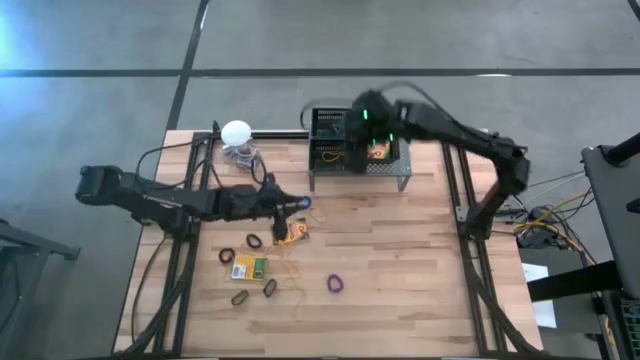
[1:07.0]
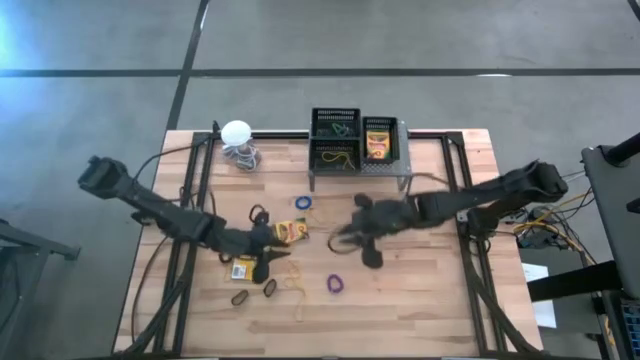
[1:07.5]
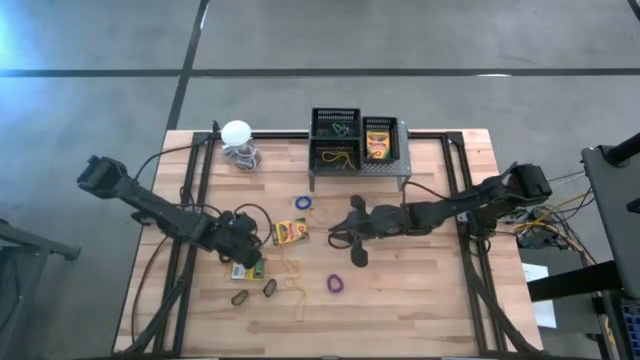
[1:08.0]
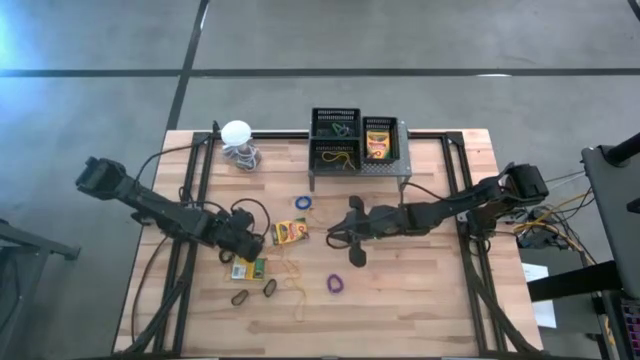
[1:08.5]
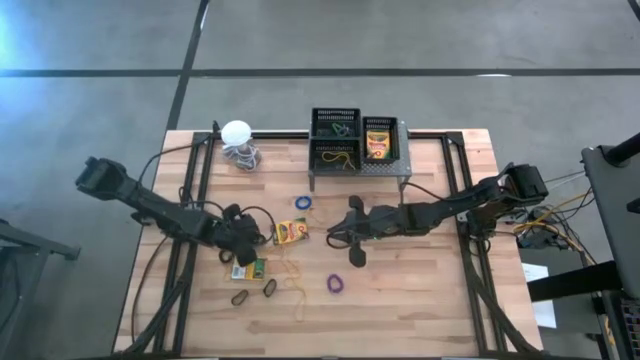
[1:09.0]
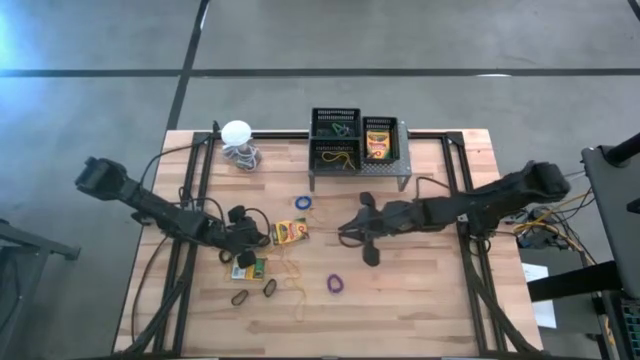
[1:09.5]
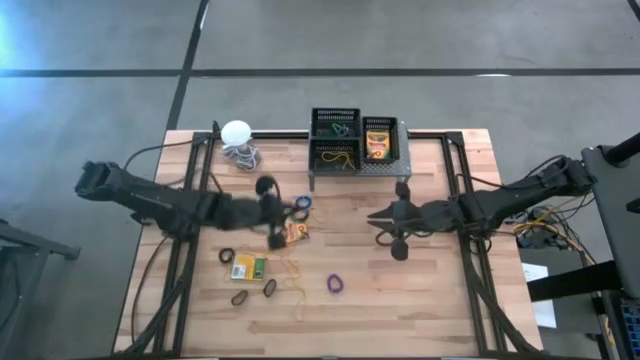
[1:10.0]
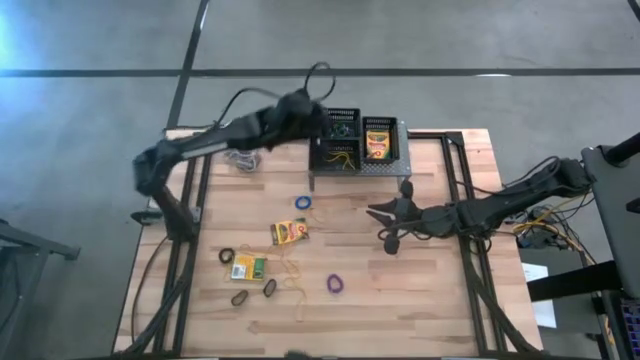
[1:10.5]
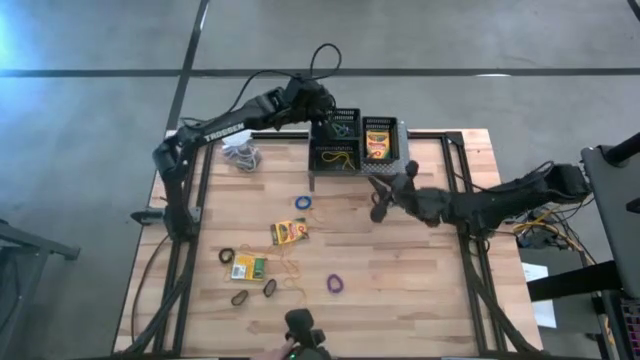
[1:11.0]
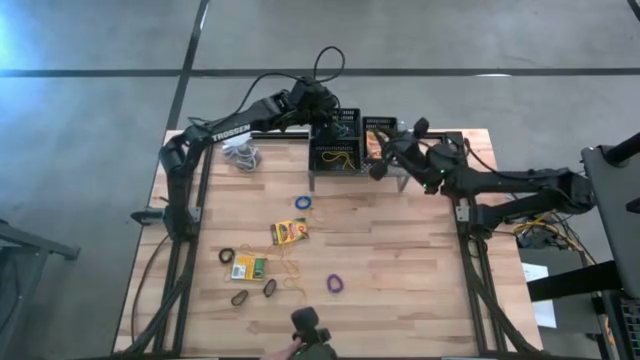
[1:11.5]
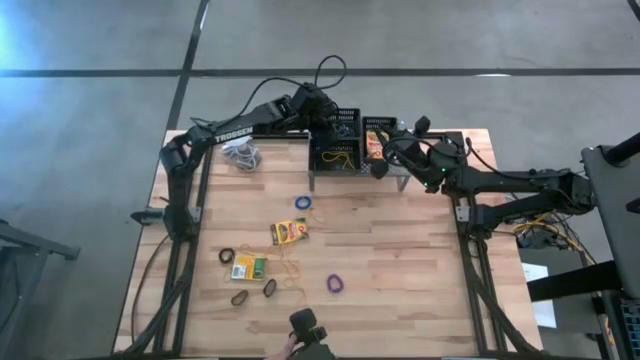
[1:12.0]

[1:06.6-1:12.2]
Task: Pick & Place Office Desk Supplies
Put the right black spring keychain into the top left black bin

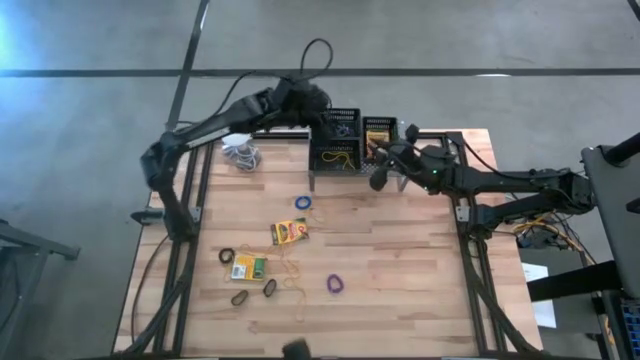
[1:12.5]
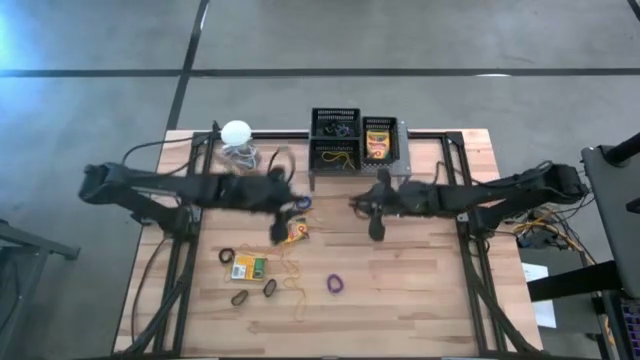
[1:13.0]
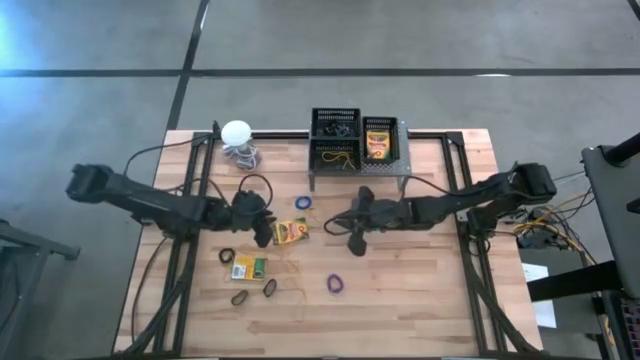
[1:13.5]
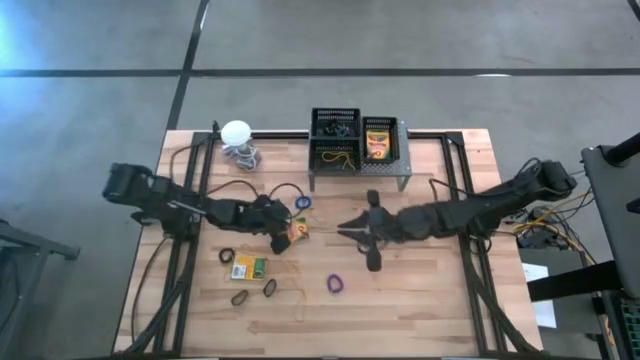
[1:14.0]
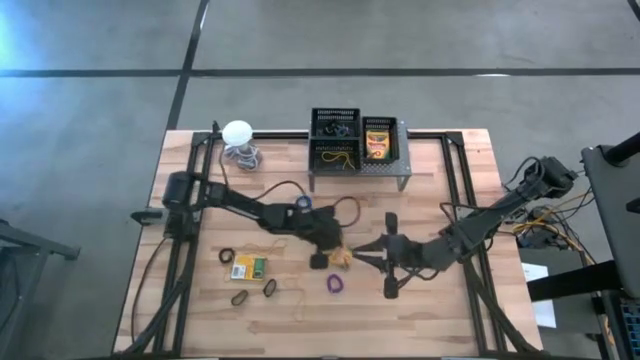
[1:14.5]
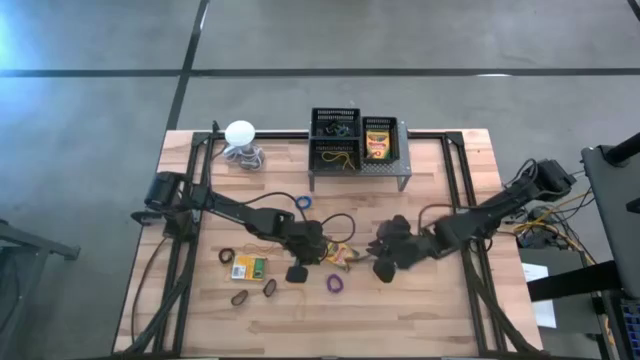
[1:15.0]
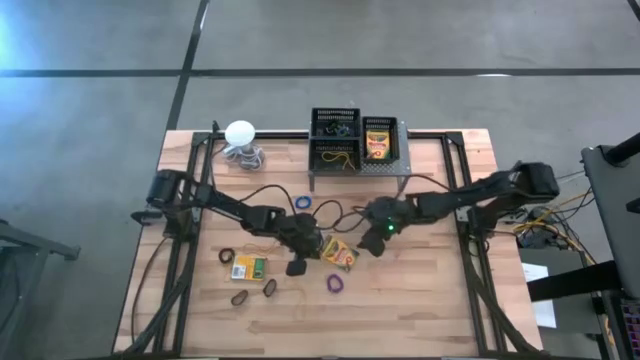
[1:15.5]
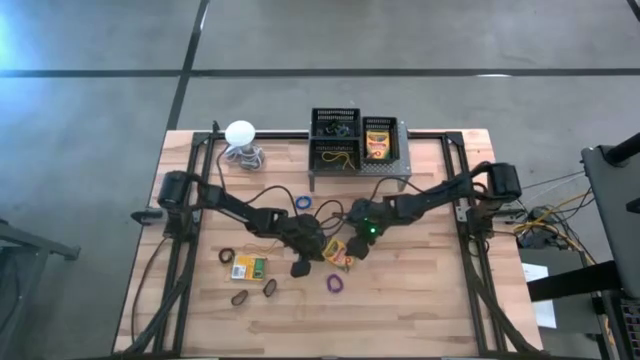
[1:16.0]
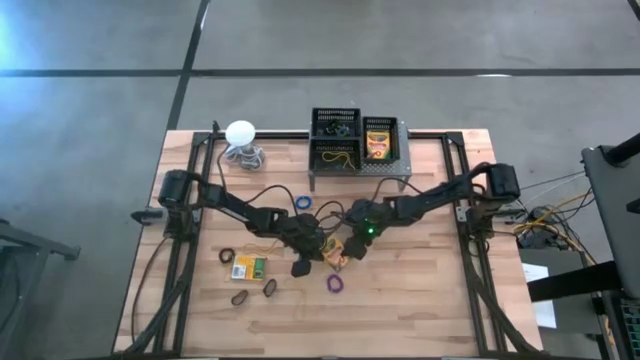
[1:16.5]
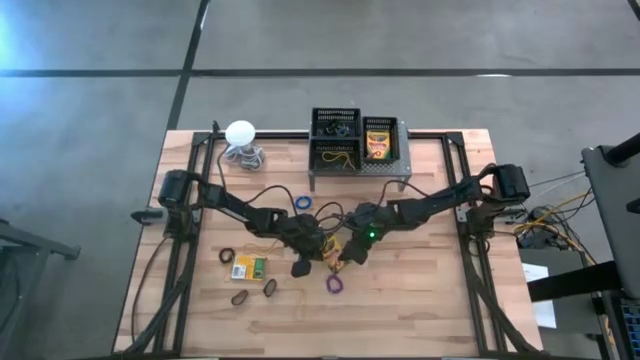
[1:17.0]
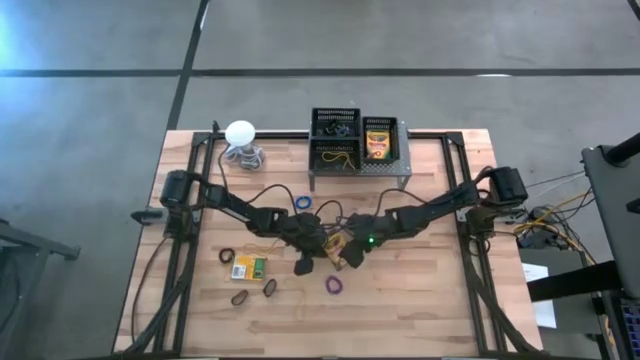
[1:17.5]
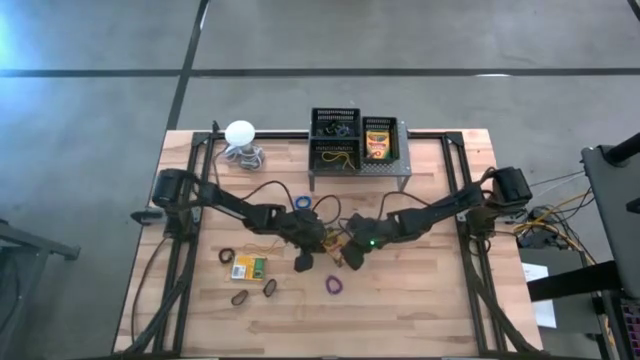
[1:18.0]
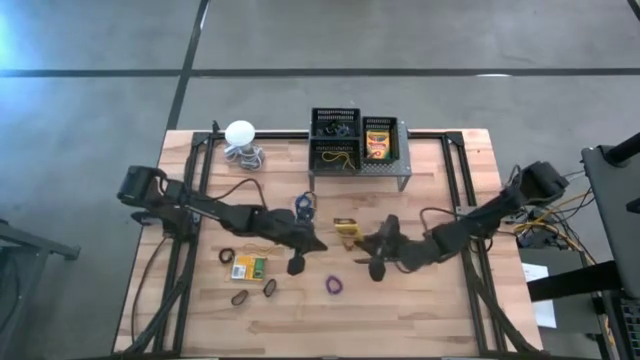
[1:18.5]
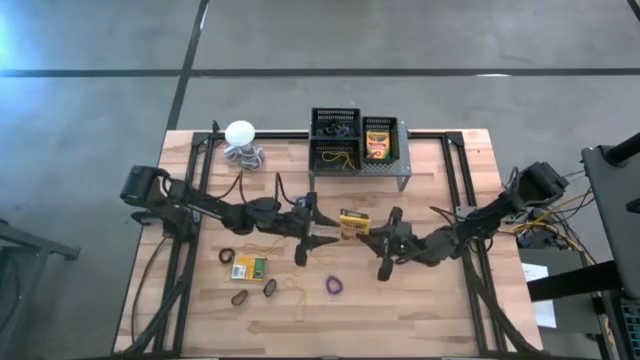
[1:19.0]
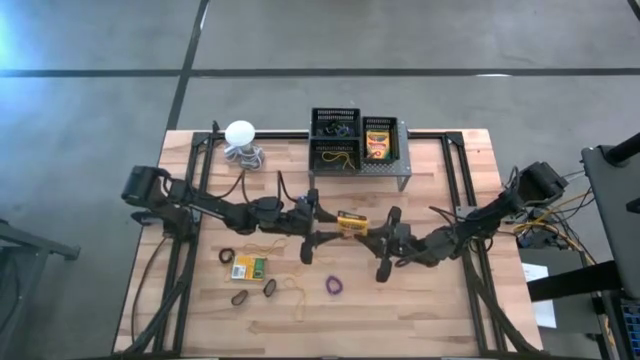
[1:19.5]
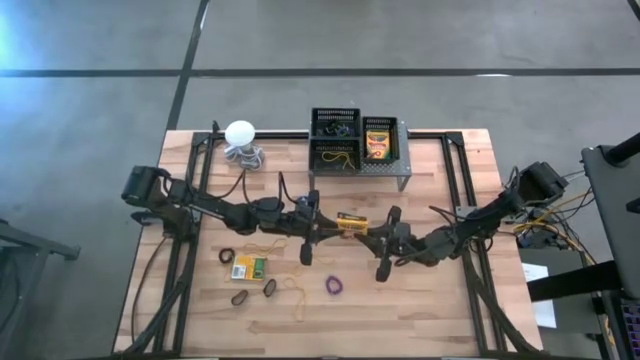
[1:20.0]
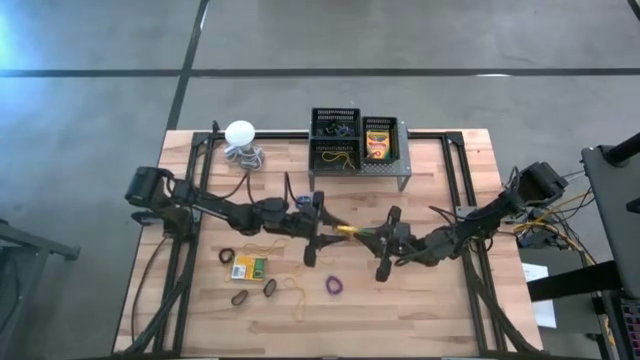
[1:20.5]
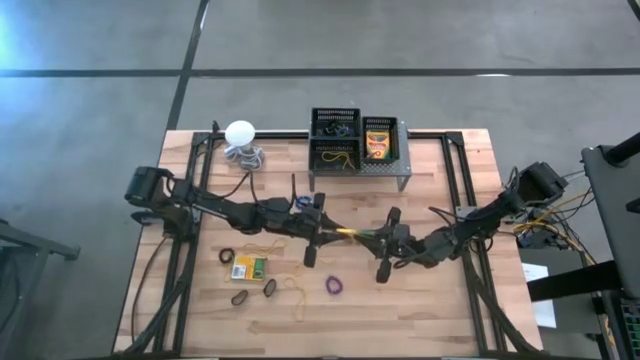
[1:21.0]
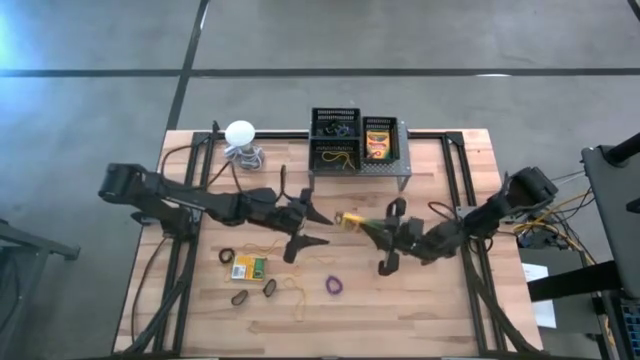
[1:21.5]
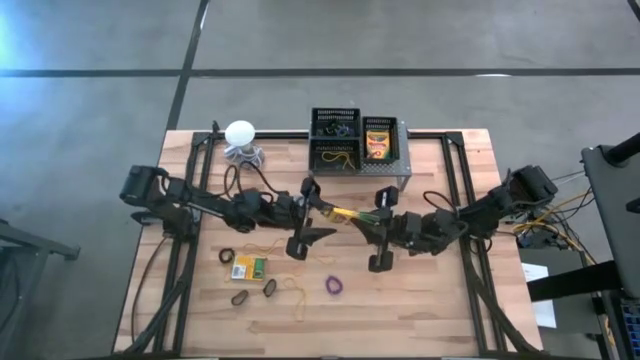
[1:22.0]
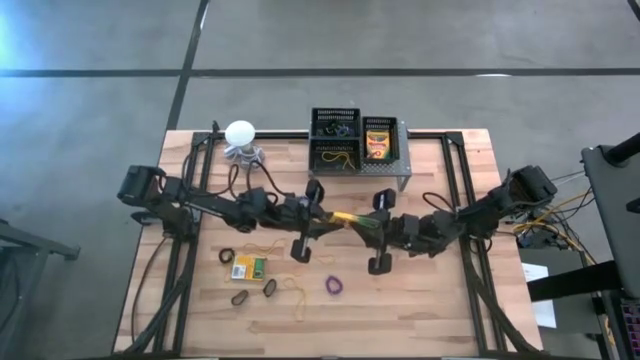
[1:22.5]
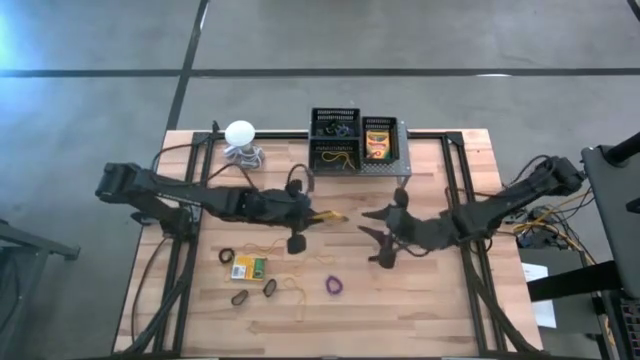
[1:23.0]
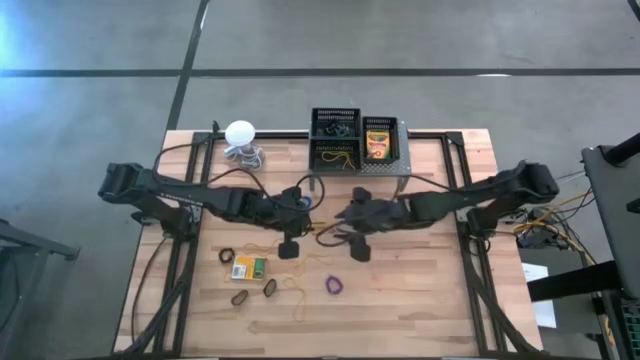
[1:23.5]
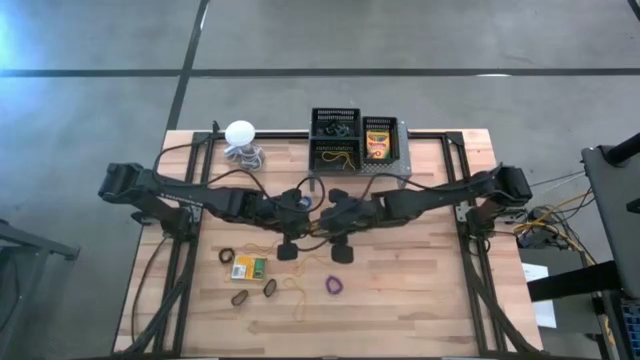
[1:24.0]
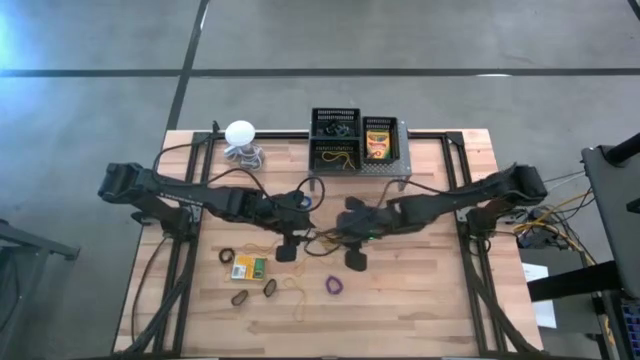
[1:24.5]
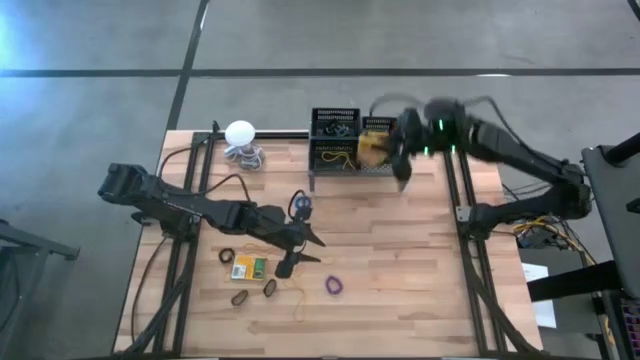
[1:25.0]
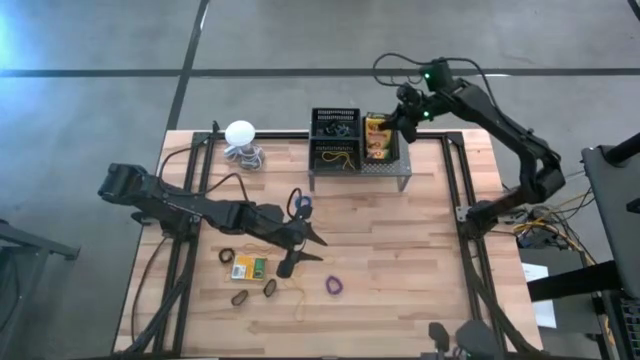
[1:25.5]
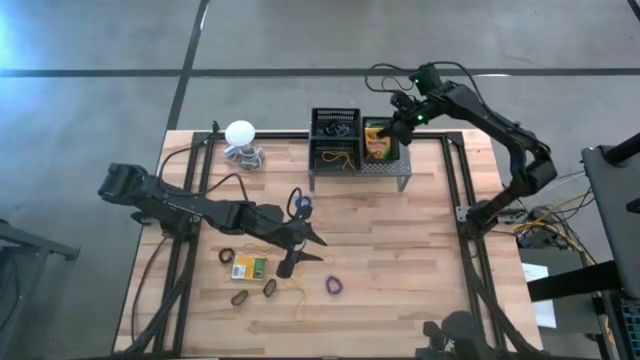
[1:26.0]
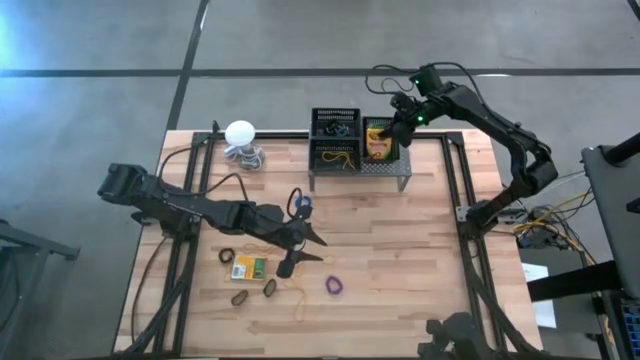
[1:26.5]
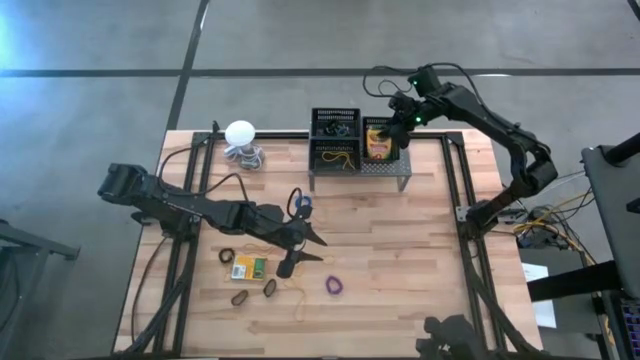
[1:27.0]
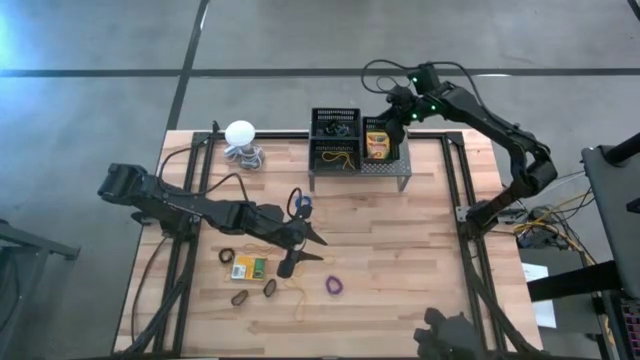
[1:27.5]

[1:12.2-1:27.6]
Put the top yellow crayon box into the right black bin
